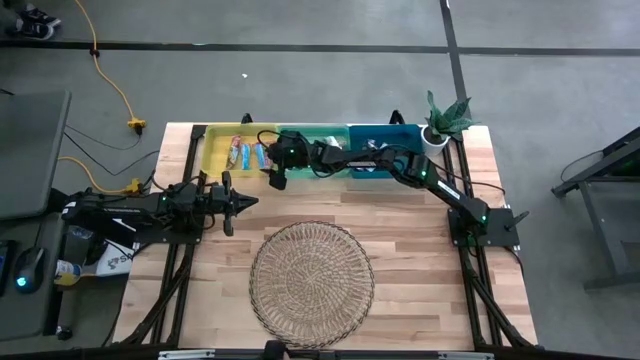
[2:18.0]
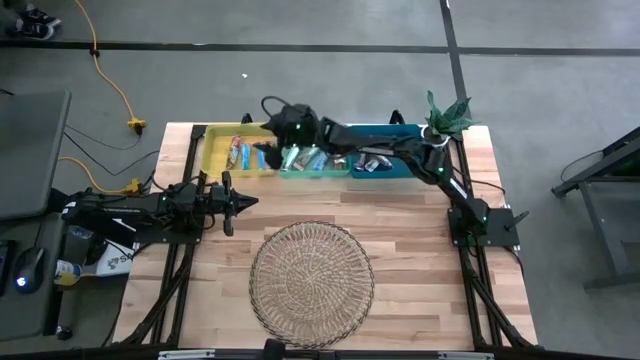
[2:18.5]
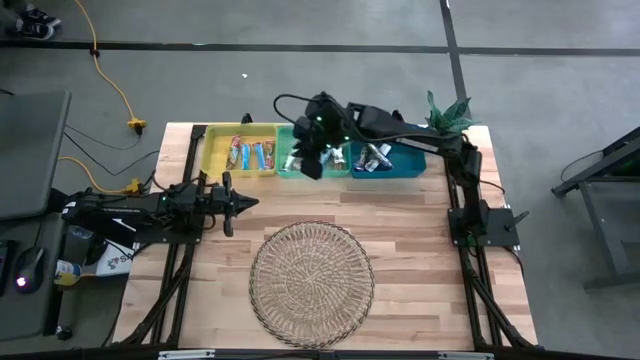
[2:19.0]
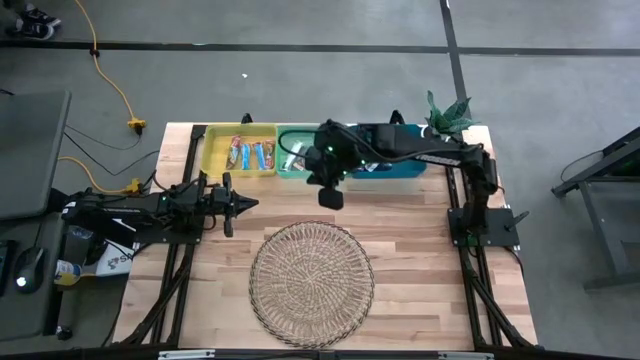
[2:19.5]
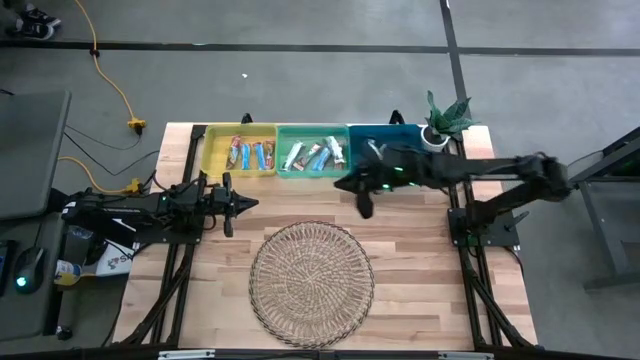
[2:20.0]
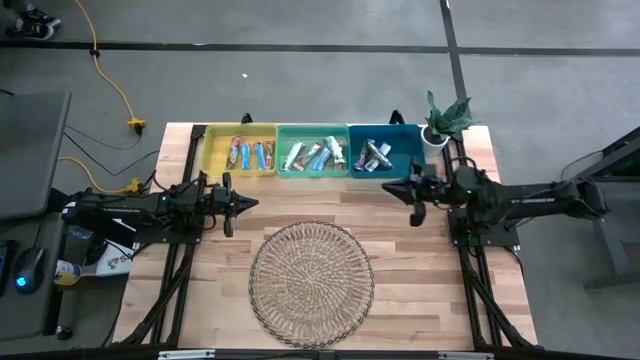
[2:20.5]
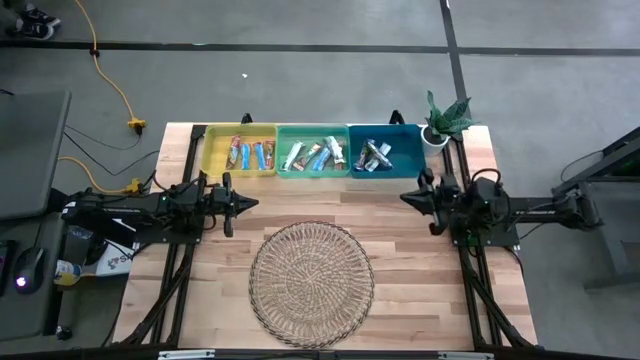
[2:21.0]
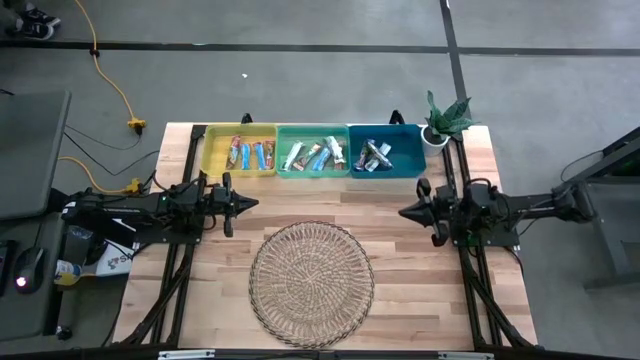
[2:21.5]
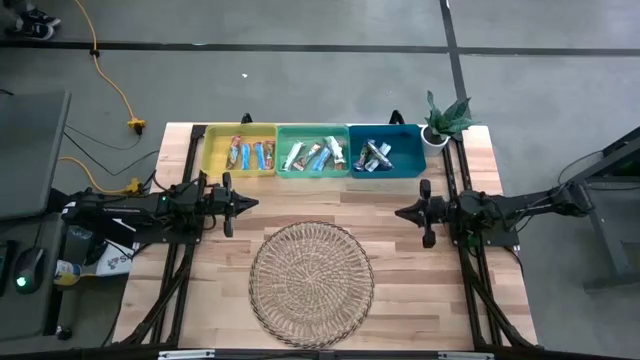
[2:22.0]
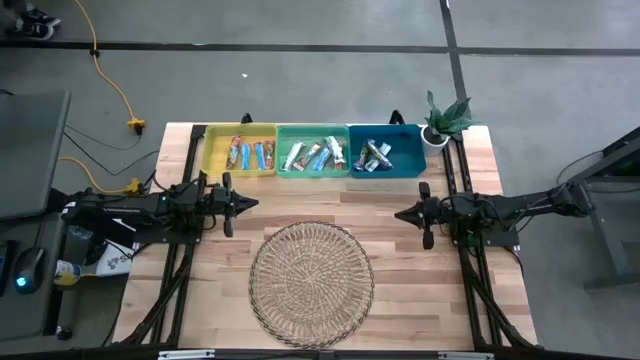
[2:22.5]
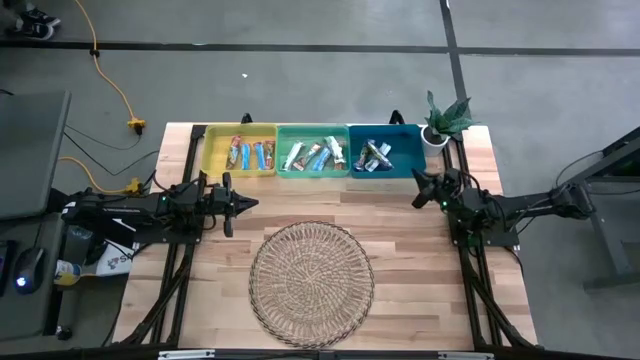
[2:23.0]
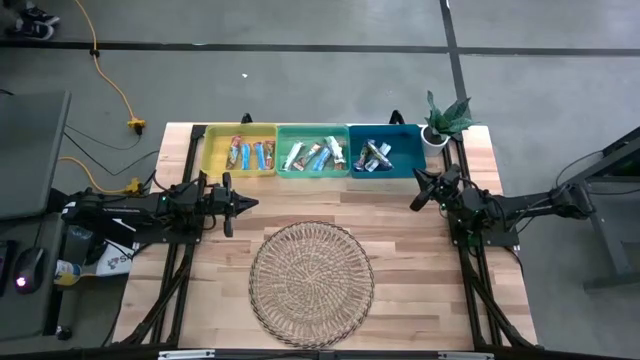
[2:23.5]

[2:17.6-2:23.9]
Task: Pick and place Granola Bars by type
Return to Home Position

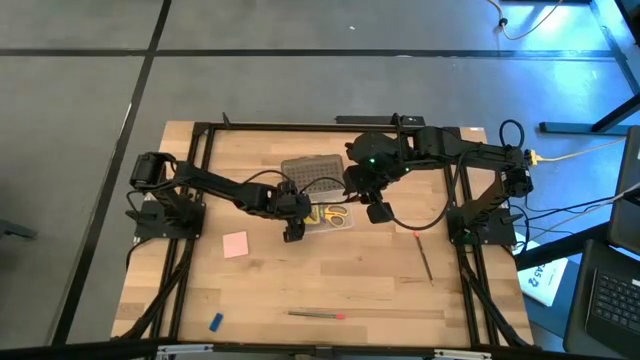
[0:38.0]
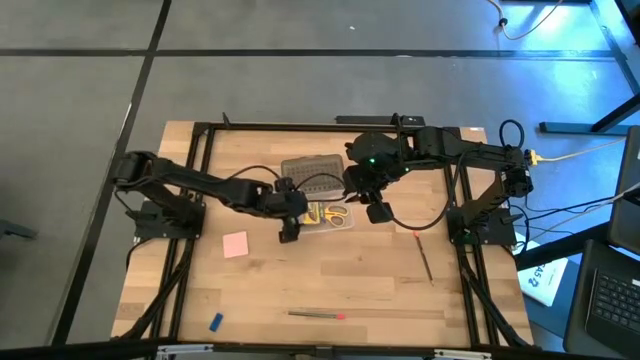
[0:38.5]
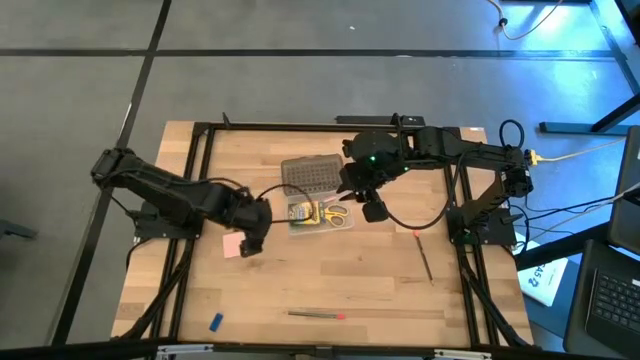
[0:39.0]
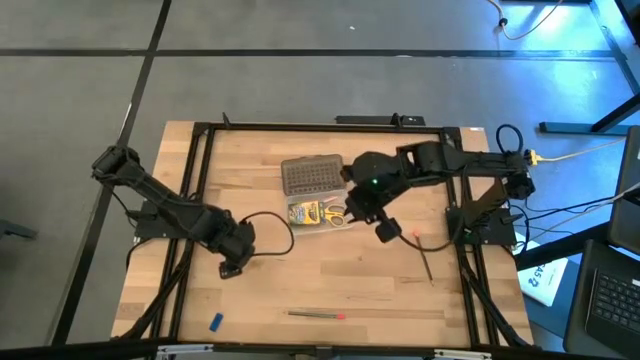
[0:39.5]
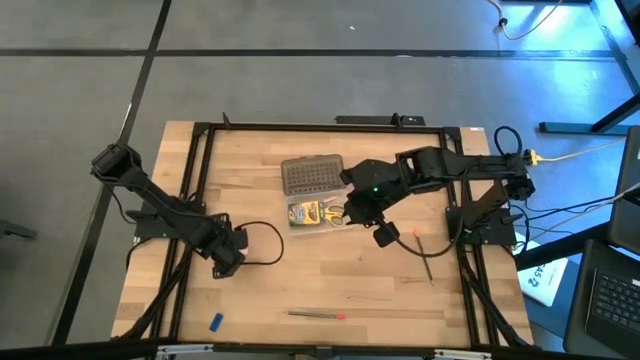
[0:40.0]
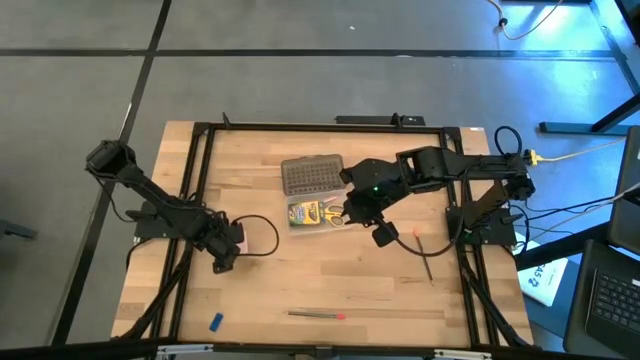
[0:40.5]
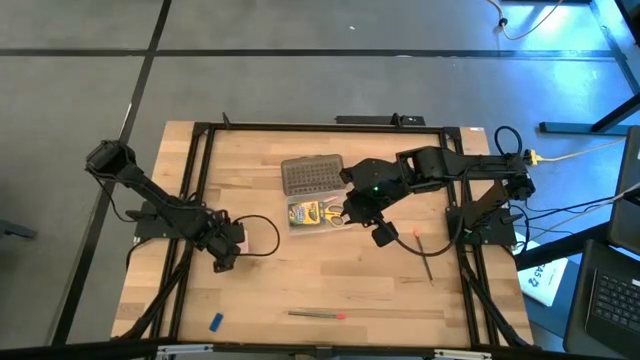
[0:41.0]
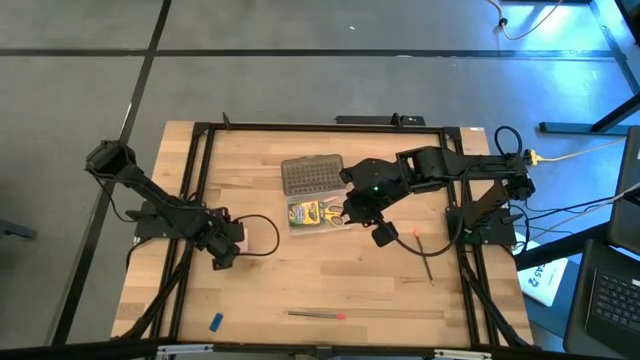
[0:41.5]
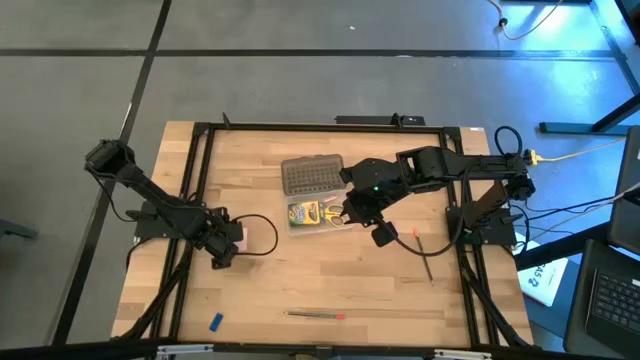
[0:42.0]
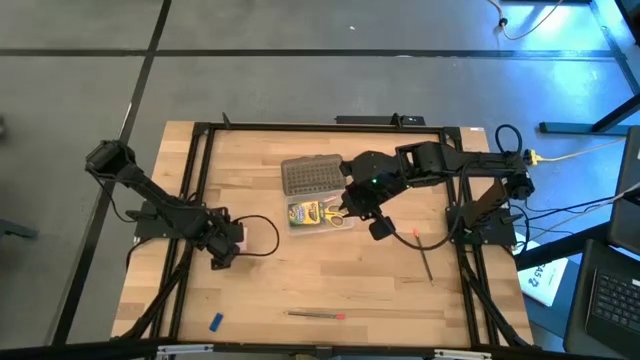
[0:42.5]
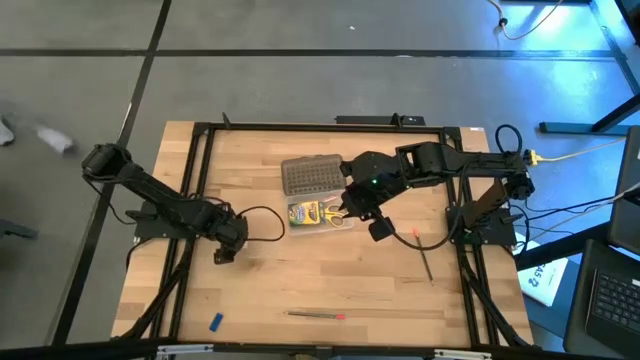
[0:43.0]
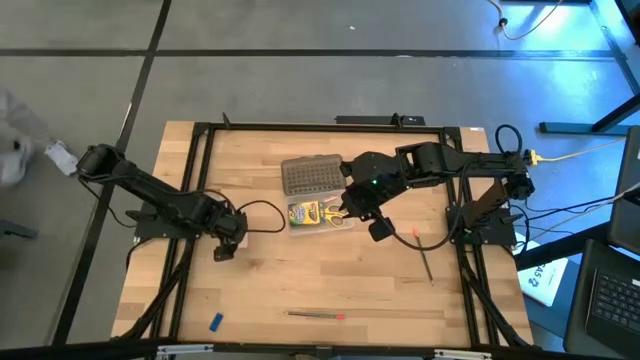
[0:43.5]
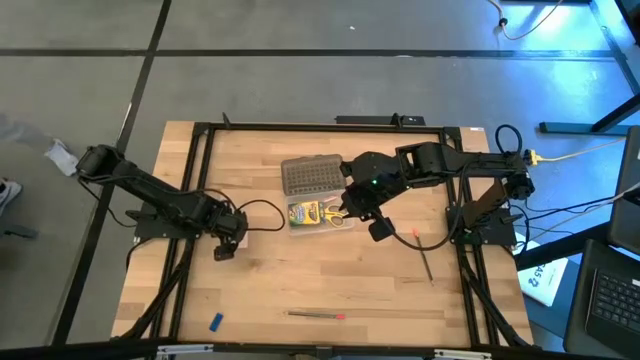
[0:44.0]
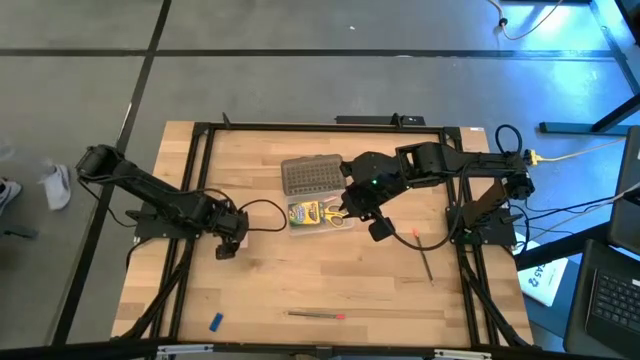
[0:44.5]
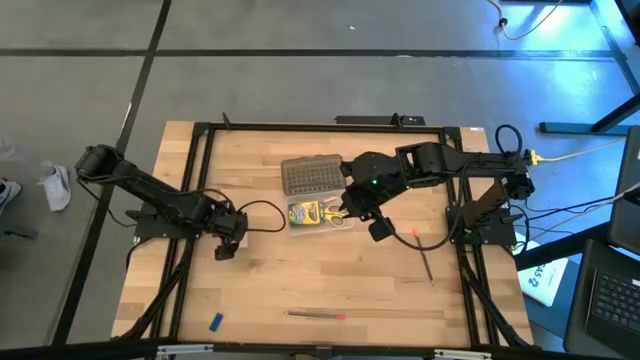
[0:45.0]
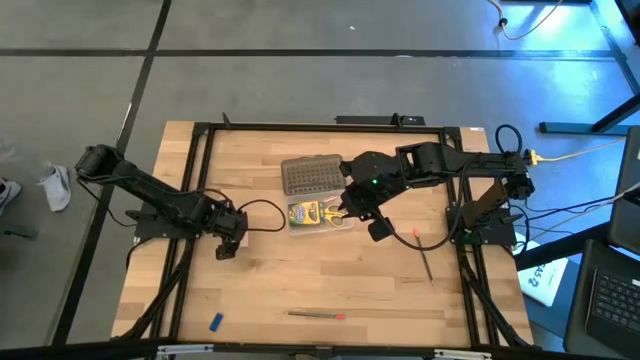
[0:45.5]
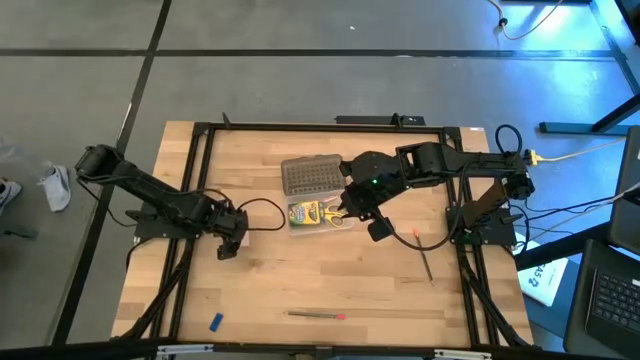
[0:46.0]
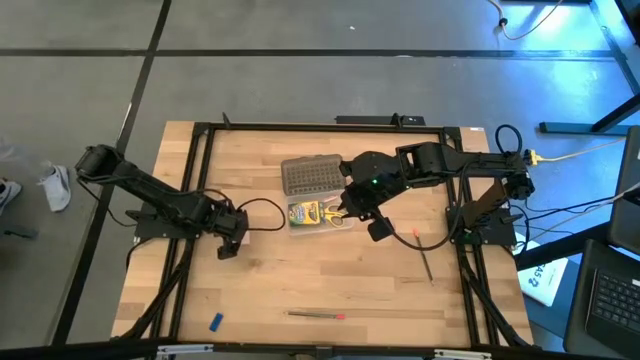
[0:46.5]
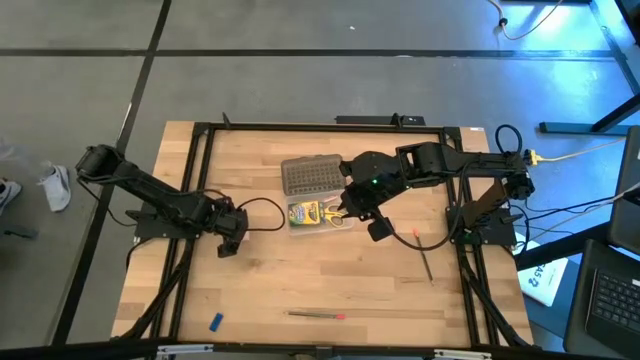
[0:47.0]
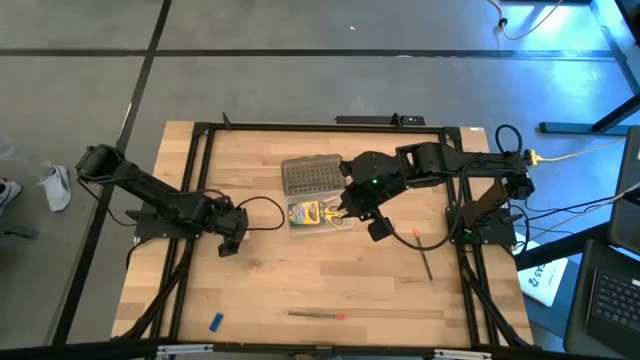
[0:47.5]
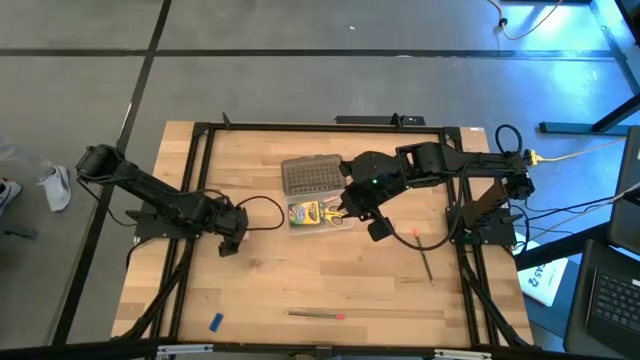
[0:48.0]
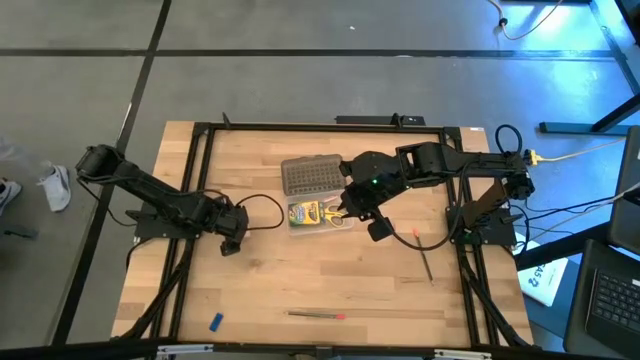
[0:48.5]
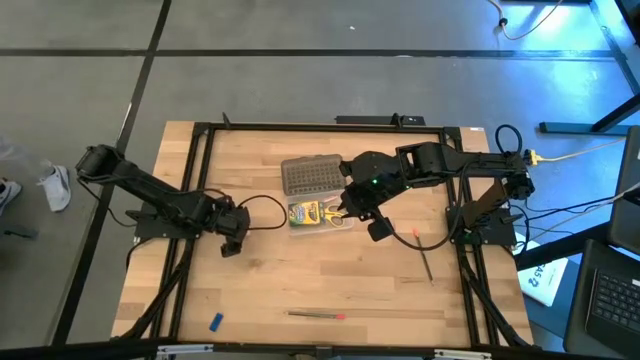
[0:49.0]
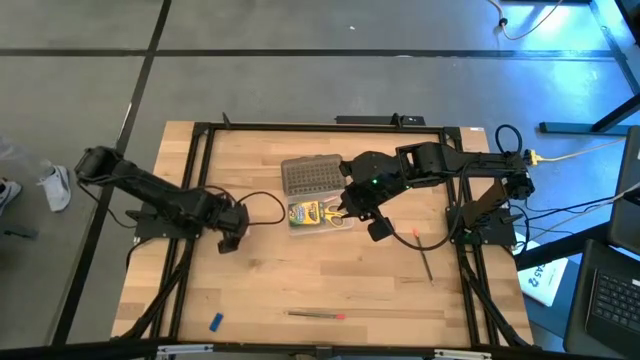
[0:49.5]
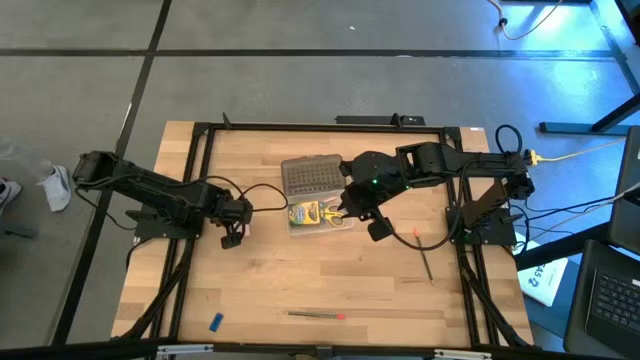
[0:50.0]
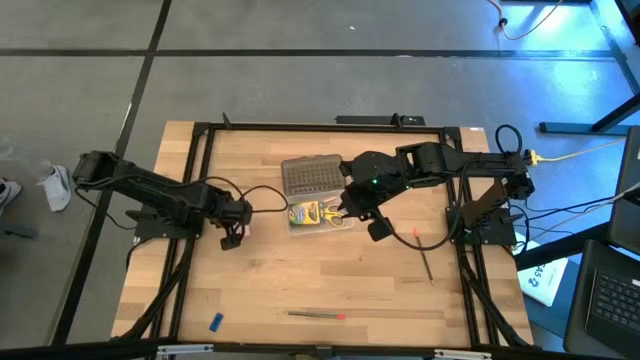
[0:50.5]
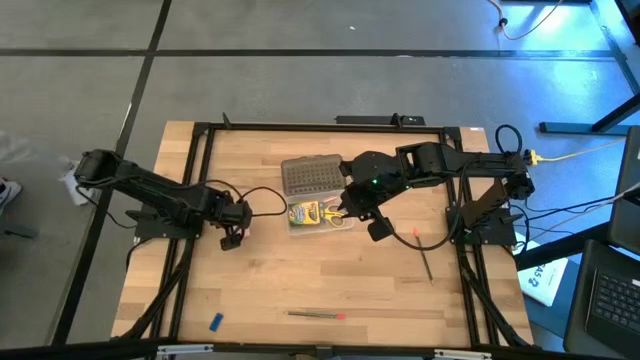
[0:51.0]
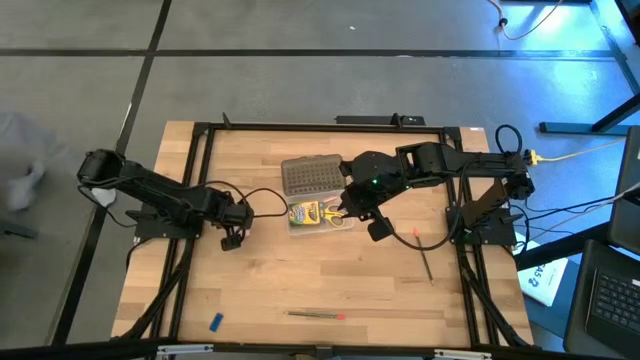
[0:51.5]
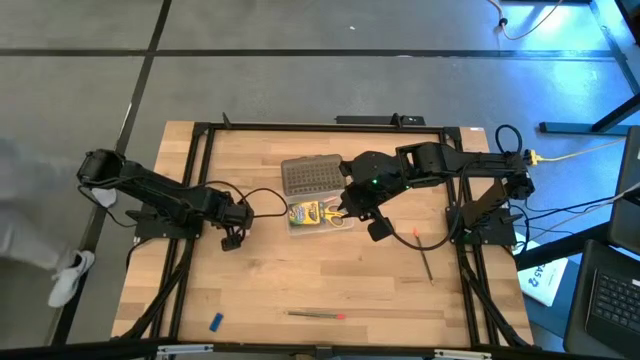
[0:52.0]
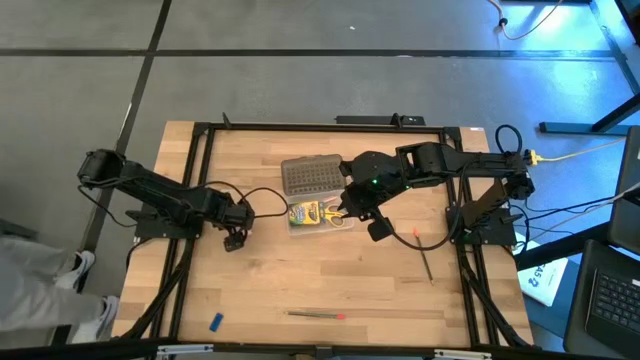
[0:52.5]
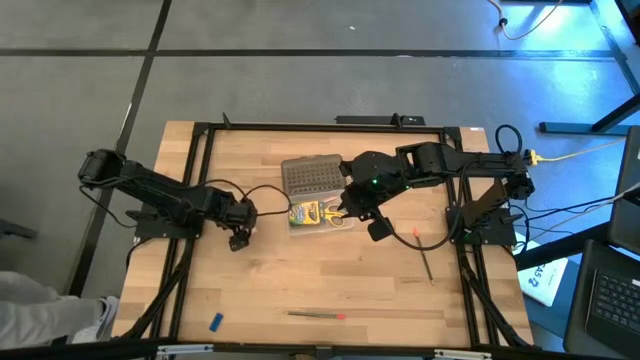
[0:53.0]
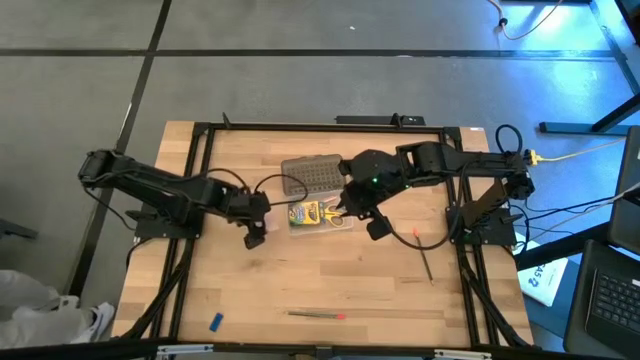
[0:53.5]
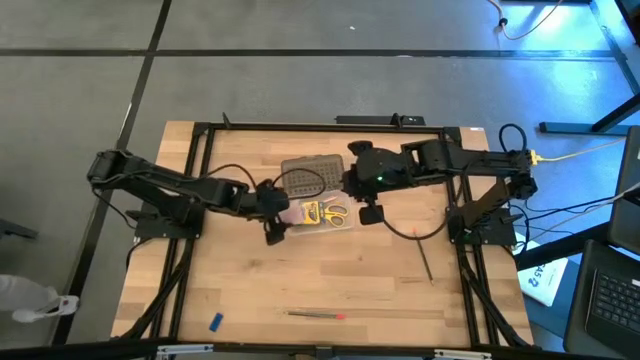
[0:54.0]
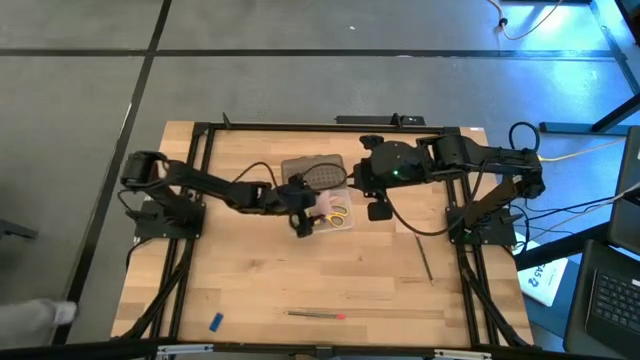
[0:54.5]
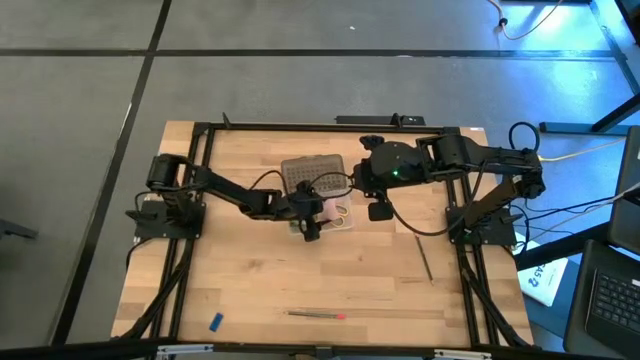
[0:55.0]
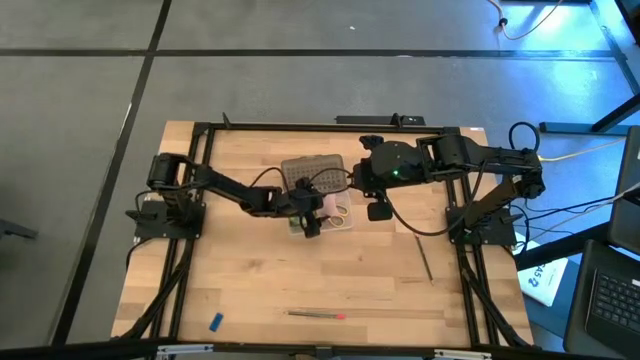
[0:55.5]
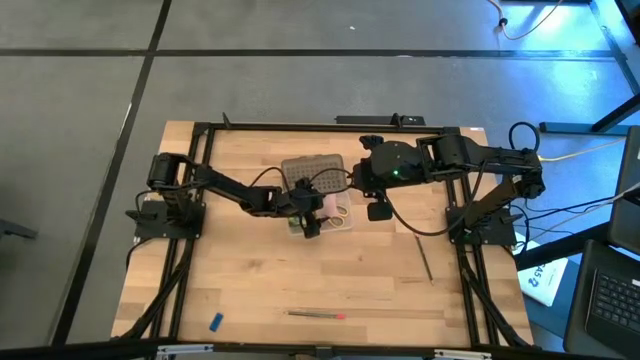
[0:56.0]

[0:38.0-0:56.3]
Task: Pack school essentials
Put the pink sticky note into the black supply box
